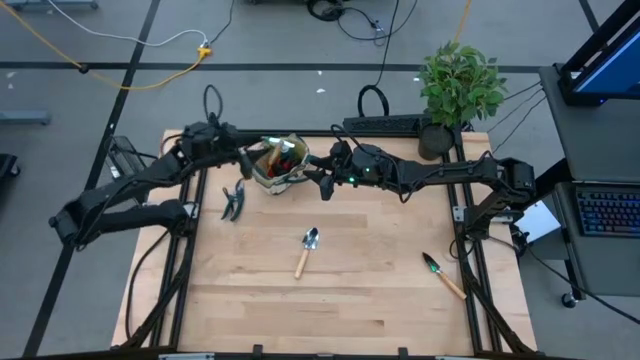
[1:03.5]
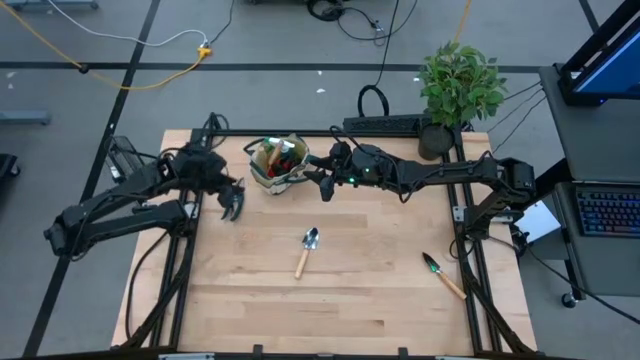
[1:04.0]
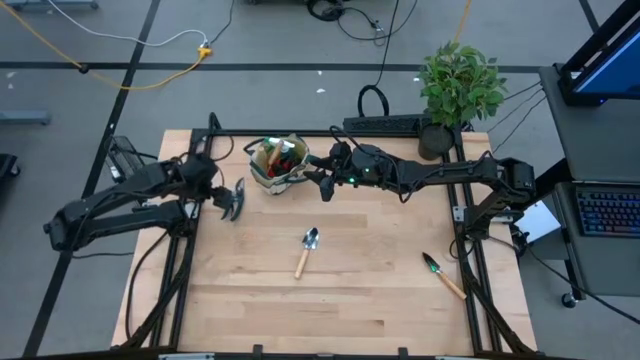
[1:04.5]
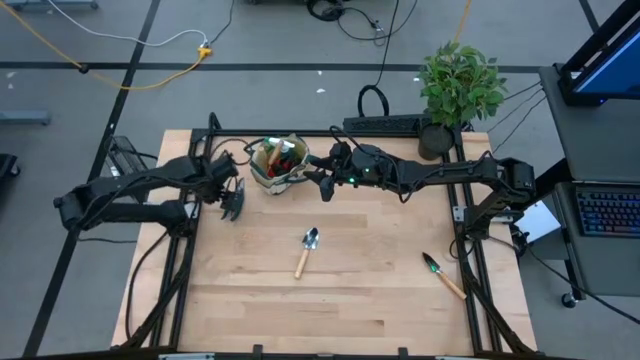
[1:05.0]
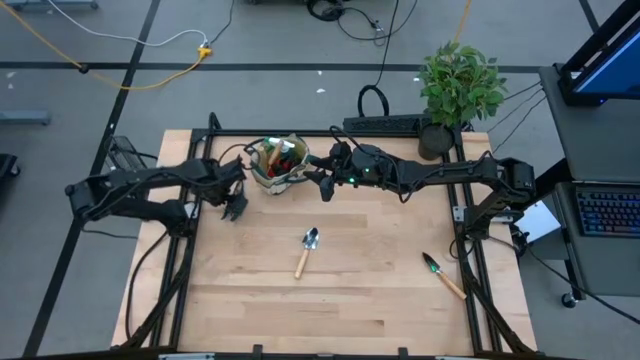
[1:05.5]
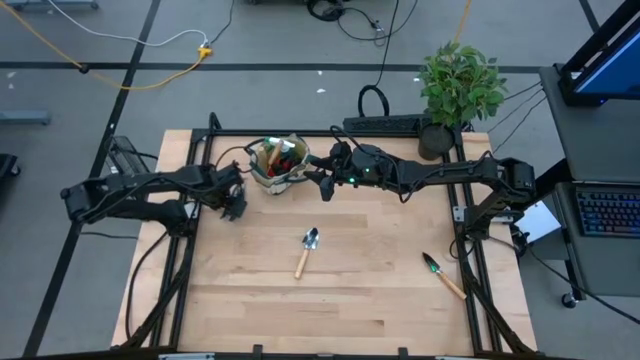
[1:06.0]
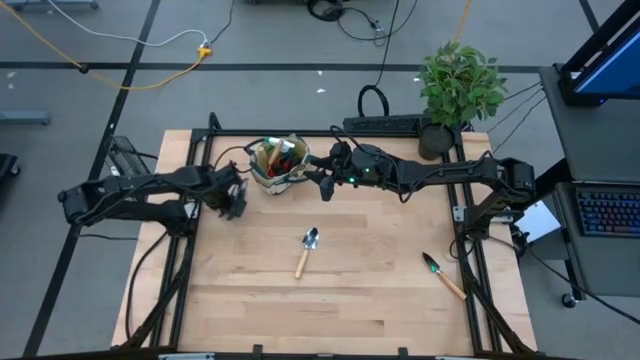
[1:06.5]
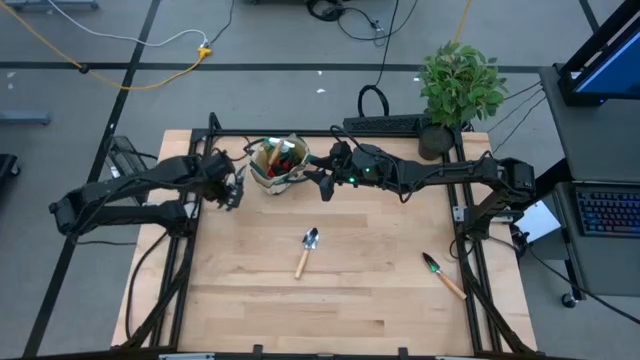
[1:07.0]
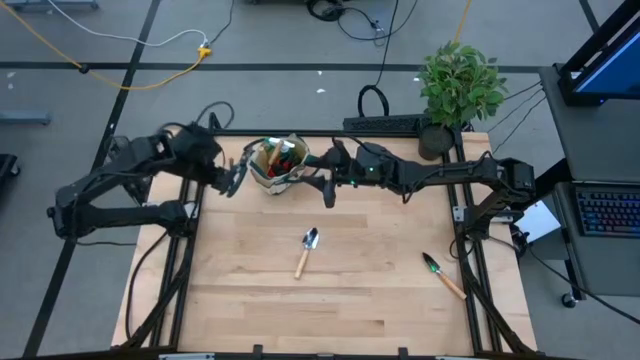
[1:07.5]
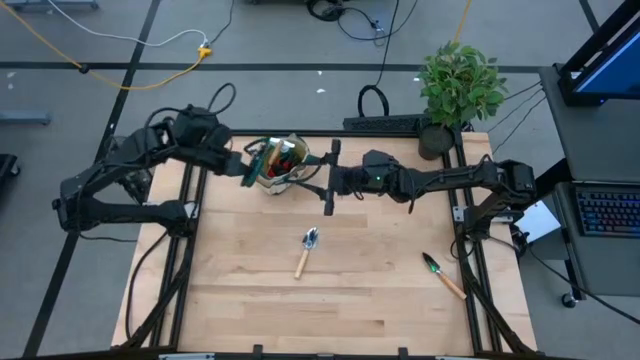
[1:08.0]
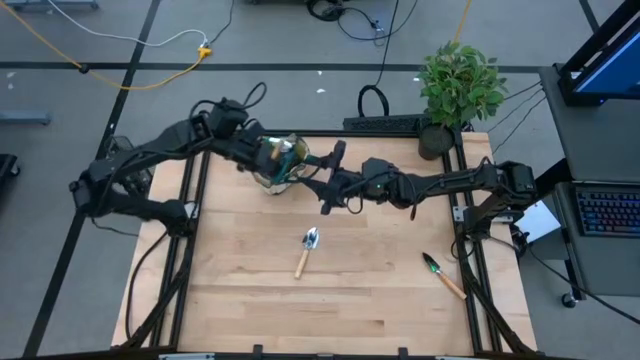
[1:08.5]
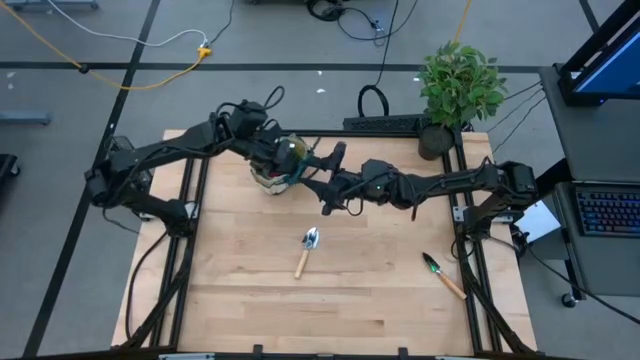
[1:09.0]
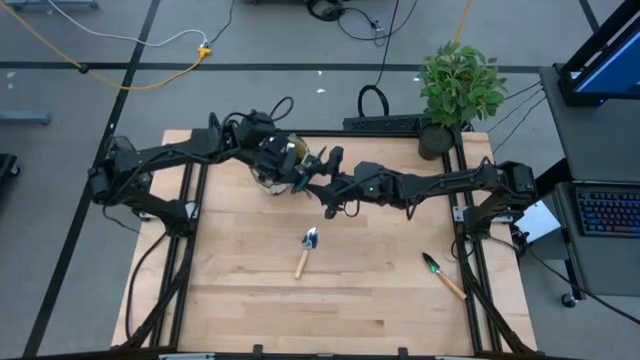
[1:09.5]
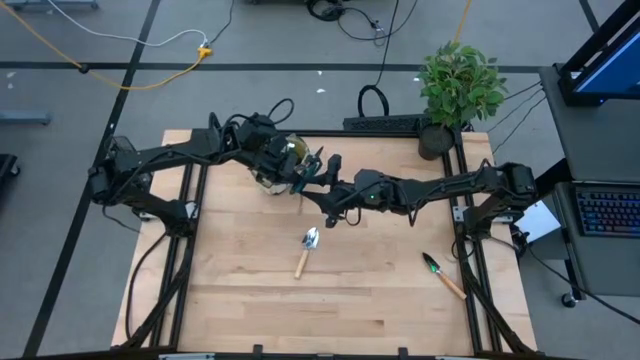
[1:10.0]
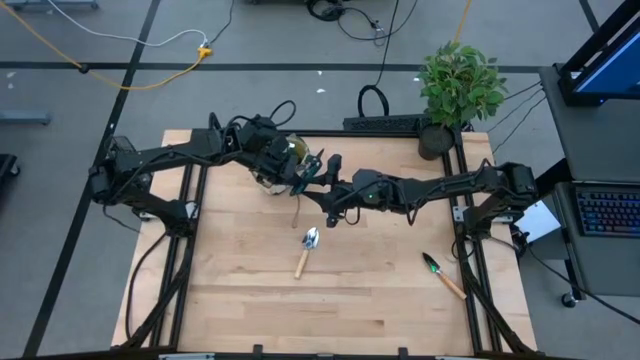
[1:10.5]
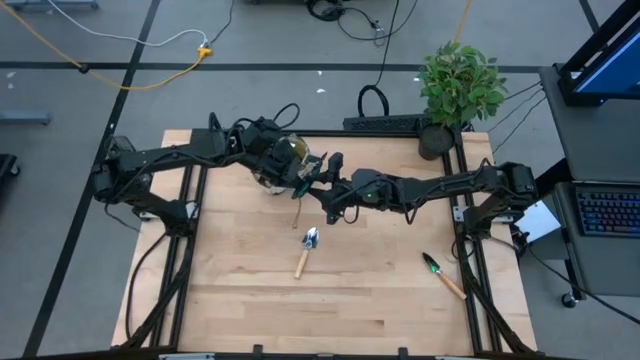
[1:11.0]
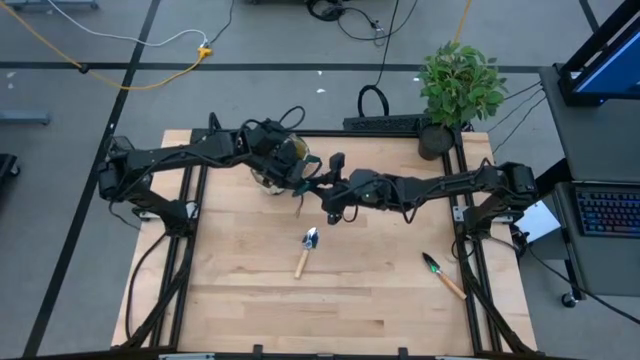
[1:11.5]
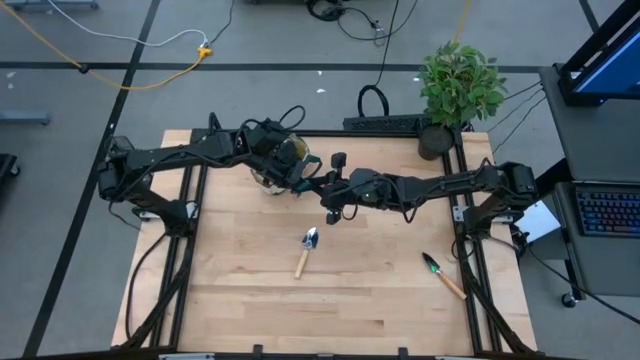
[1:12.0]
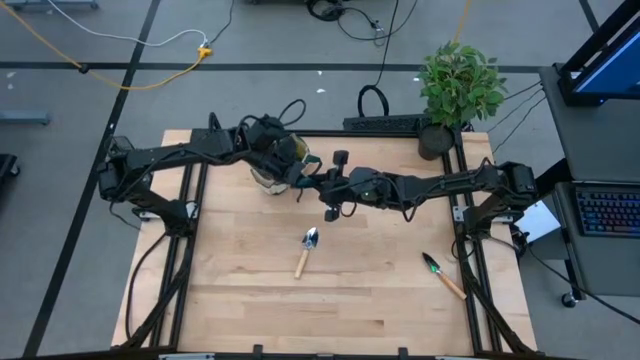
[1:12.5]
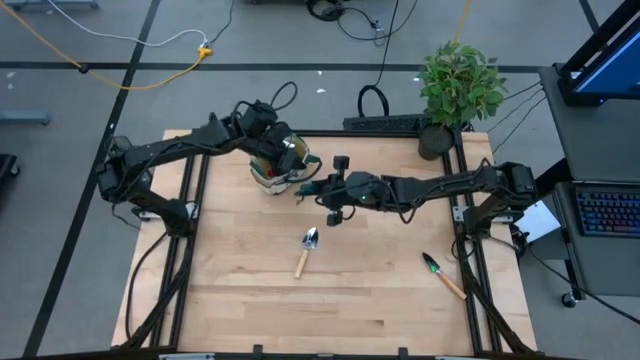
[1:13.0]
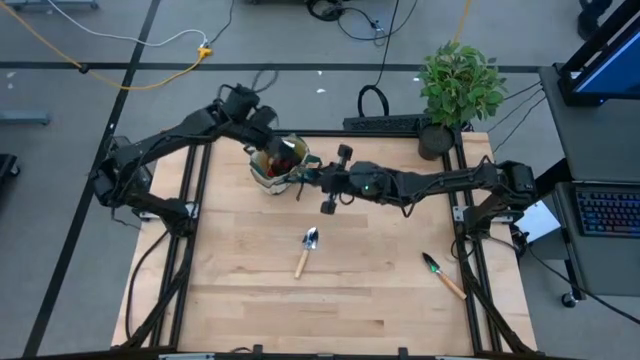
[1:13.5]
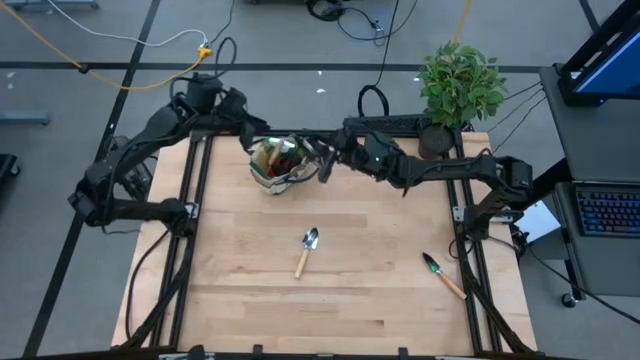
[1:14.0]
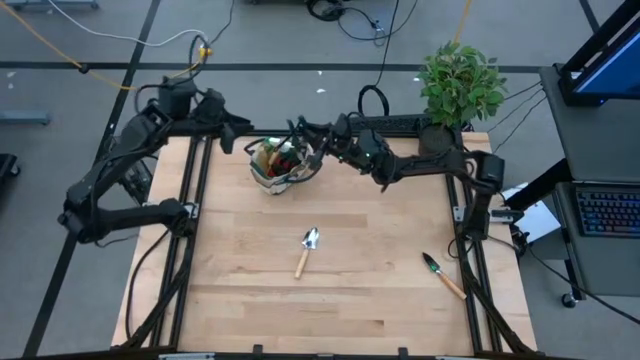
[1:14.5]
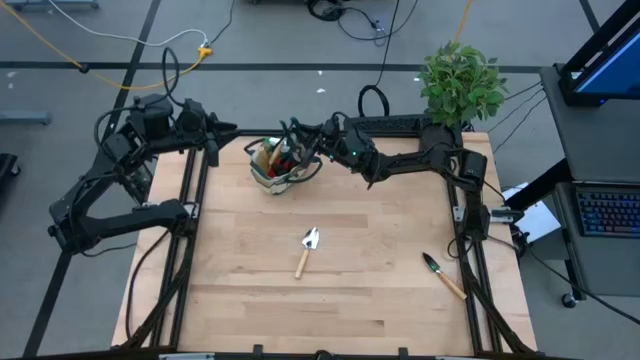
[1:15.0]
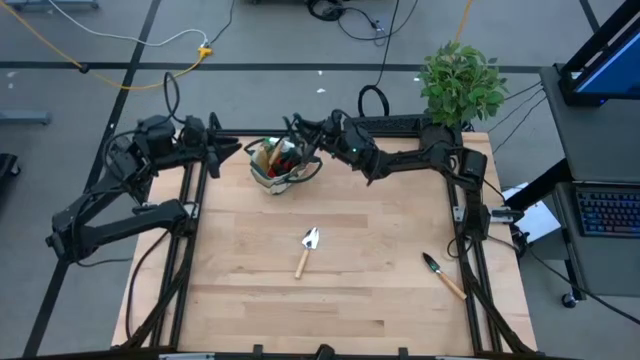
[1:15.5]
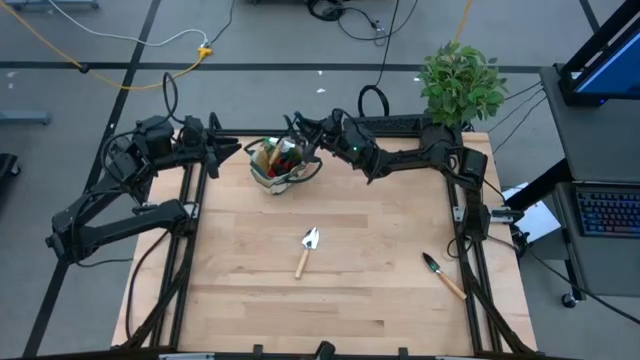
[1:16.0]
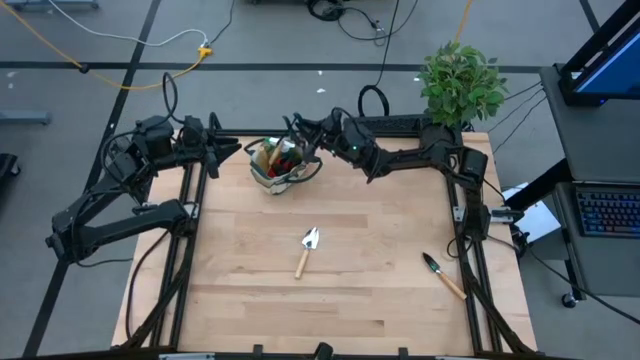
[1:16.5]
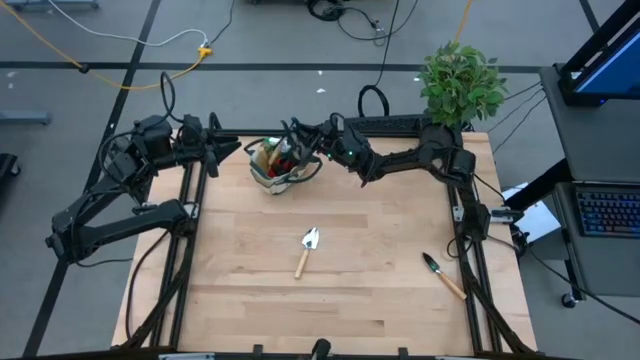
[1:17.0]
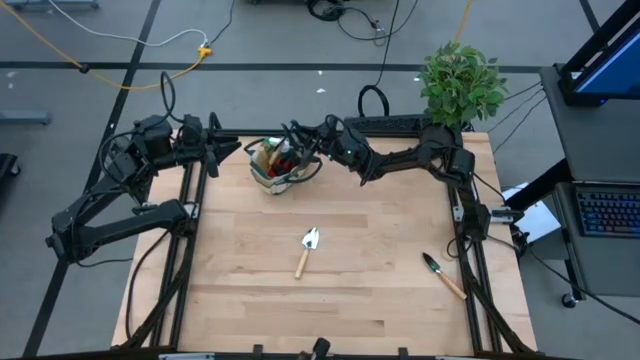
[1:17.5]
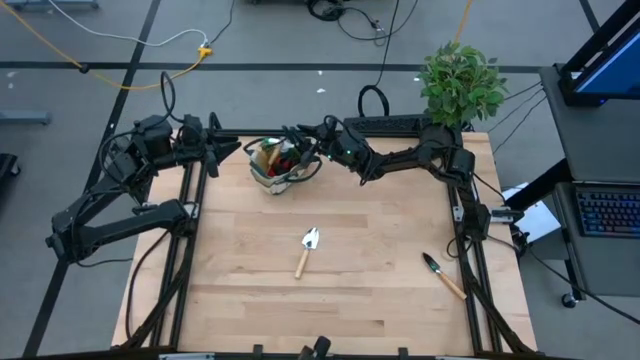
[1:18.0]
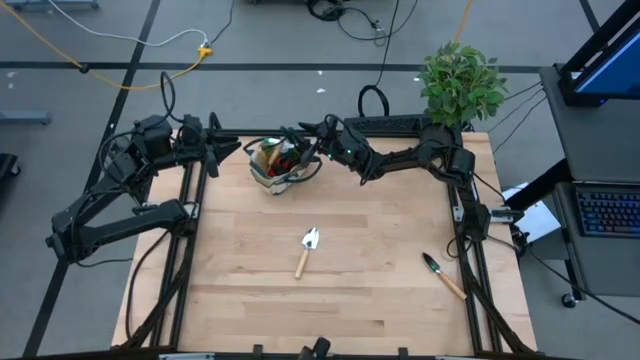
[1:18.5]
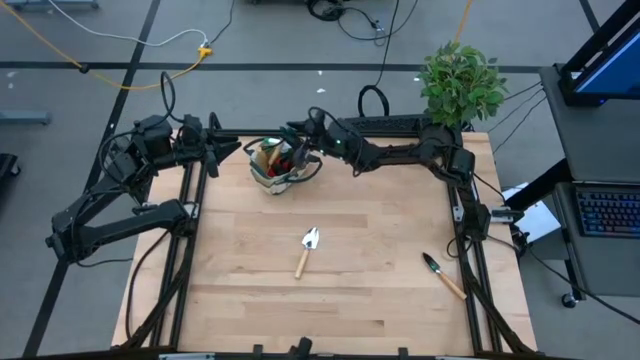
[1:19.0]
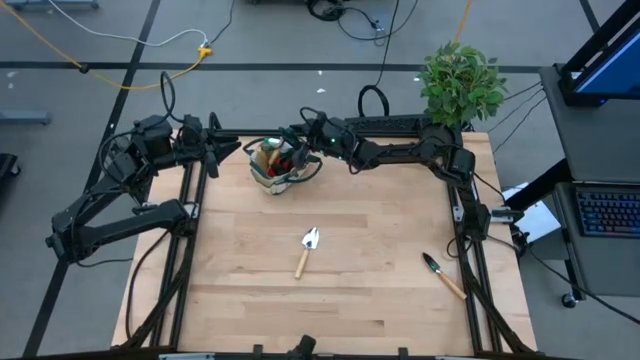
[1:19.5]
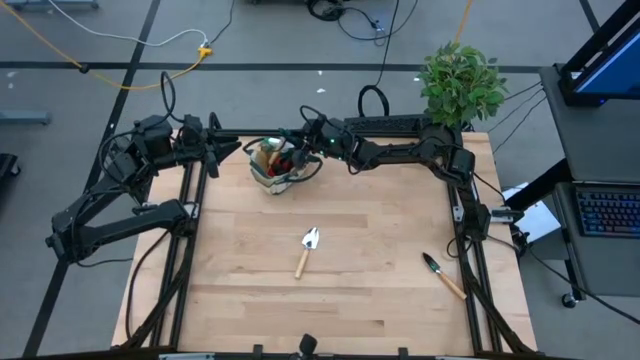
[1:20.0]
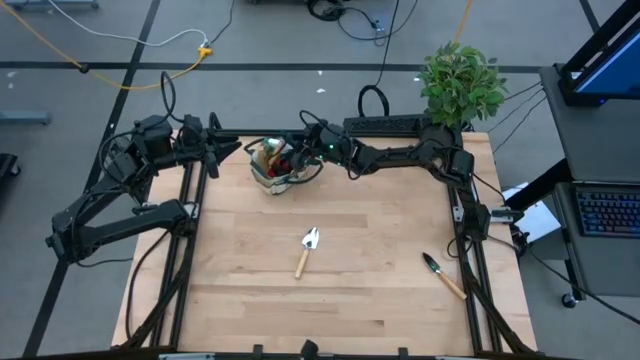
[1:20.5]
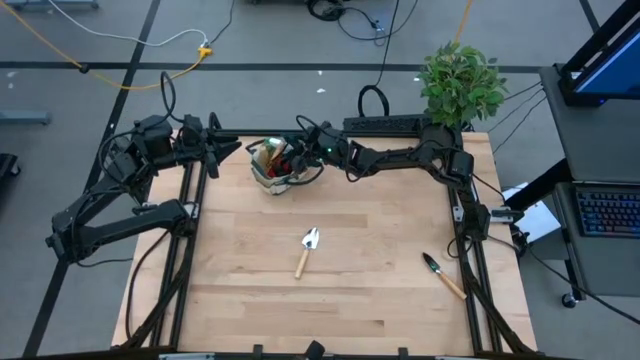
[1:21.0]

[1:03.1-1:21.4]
Task: Pick & Place Garden tools in Gardening bag
Put the shear scissors into the gardening bag

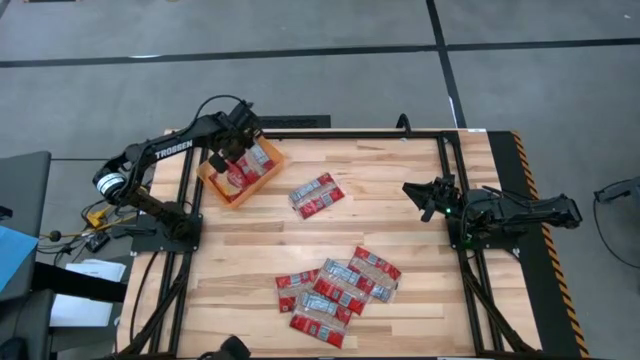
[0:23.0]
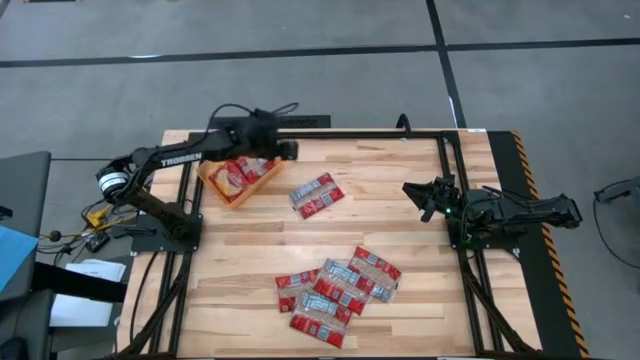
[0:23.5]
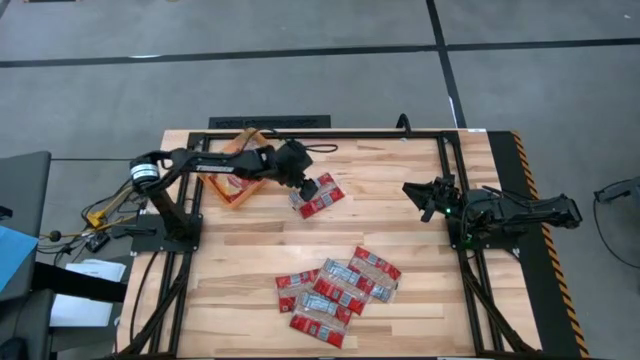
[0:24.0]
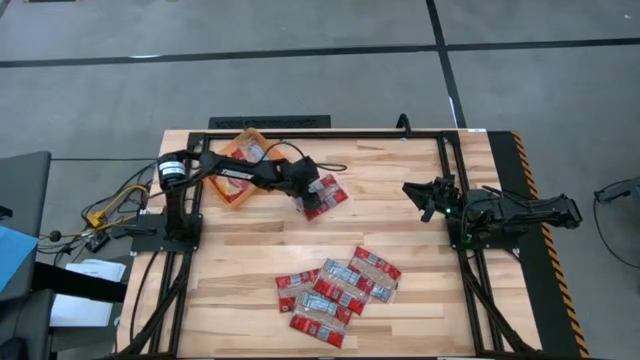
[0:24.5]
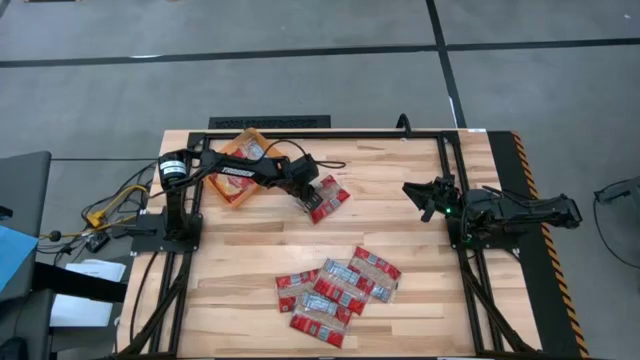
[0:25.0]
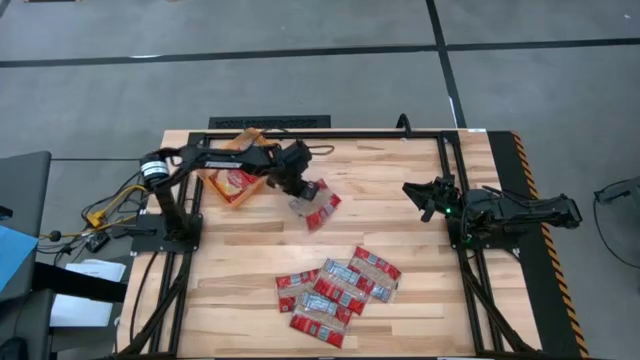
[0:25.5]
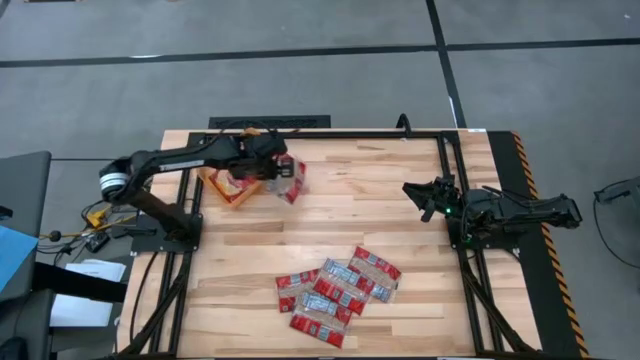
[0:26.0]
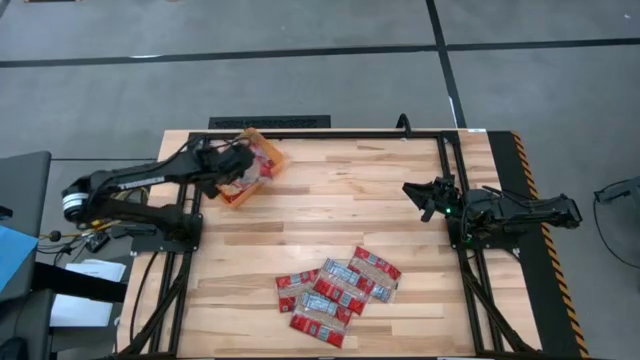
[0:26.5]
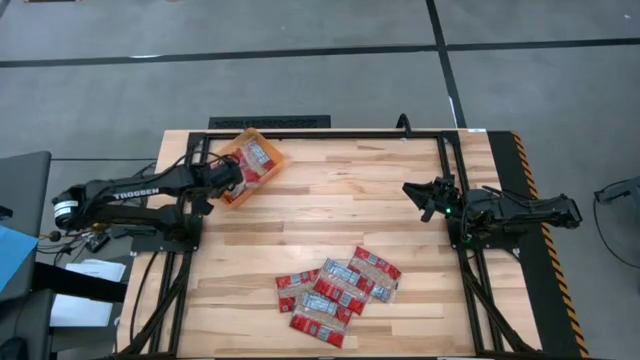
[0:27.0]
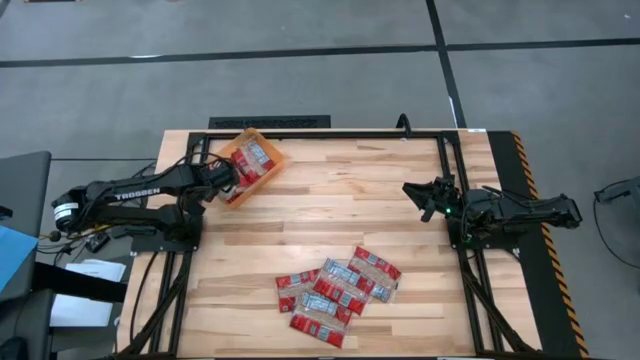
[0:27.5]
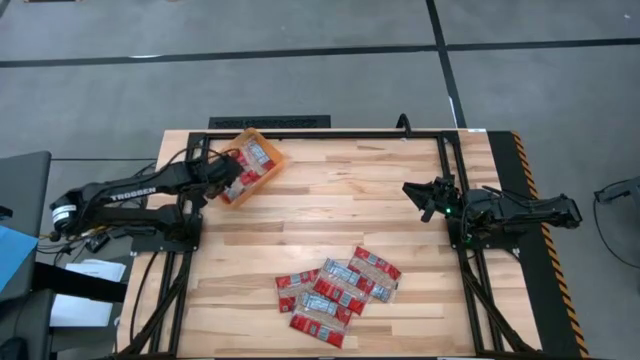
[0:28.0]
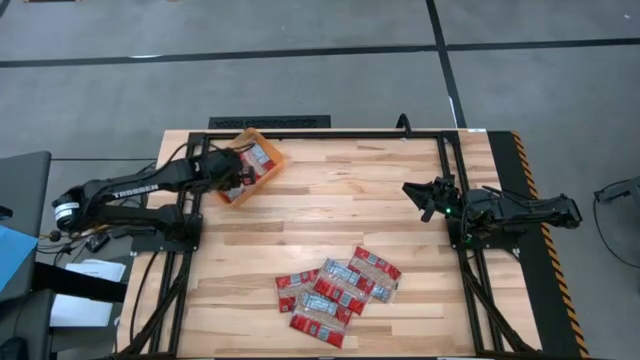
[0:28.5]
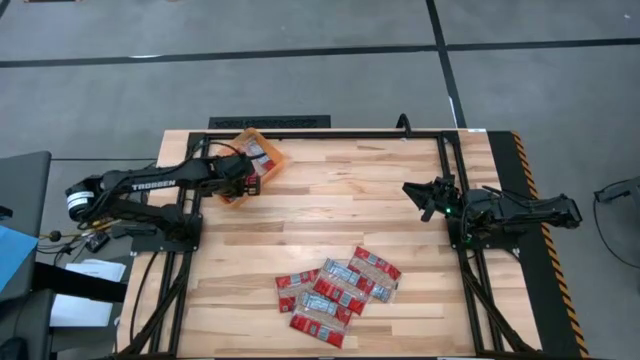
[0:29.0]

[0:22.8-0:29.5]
Task: Sort popcorn bags into baskets
Put the red popcorn pack into the orange bin
